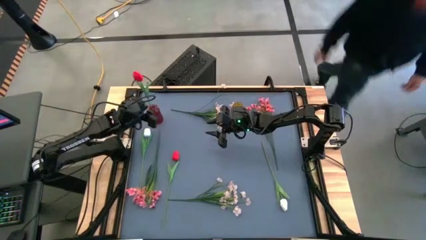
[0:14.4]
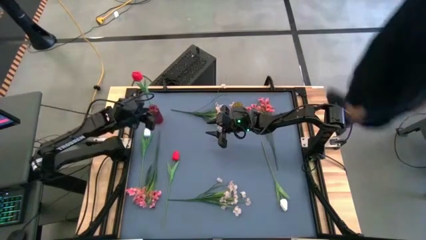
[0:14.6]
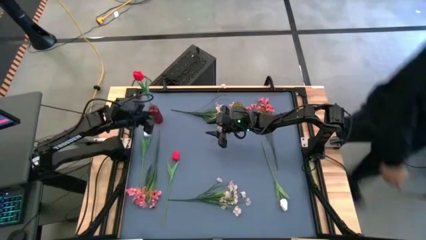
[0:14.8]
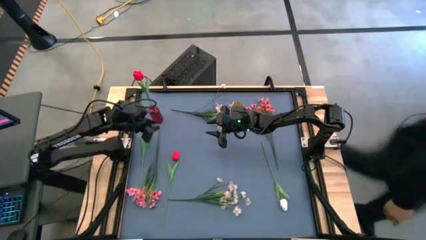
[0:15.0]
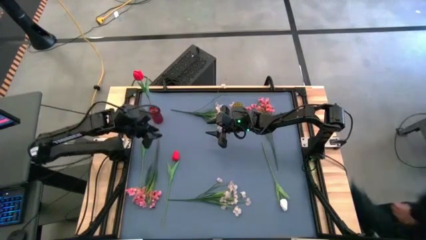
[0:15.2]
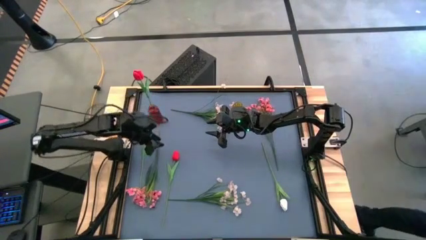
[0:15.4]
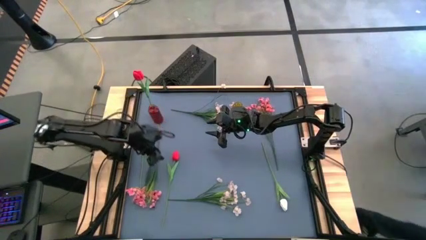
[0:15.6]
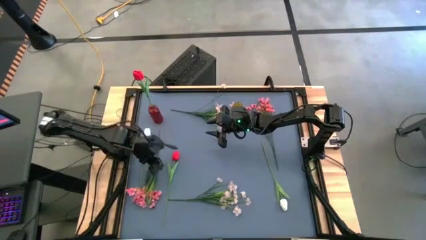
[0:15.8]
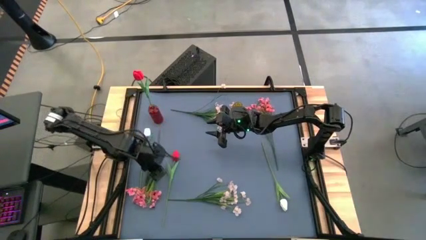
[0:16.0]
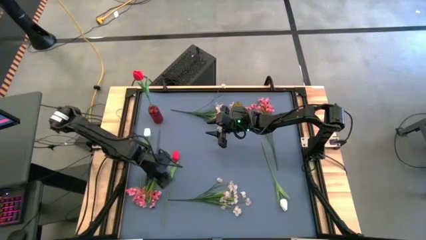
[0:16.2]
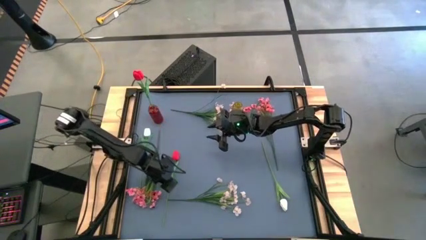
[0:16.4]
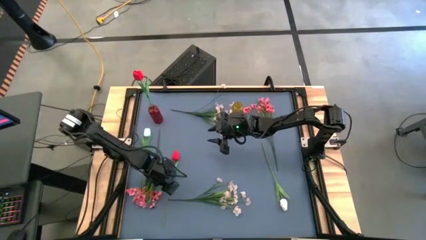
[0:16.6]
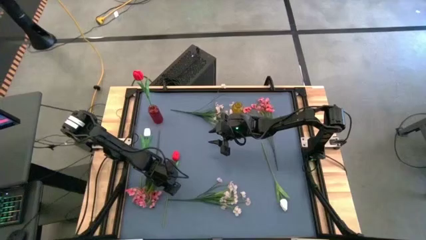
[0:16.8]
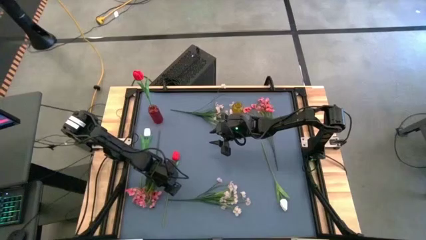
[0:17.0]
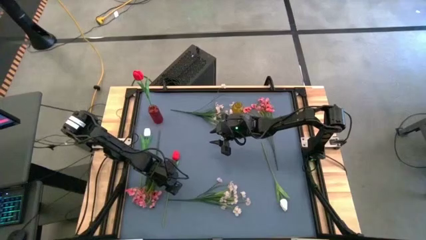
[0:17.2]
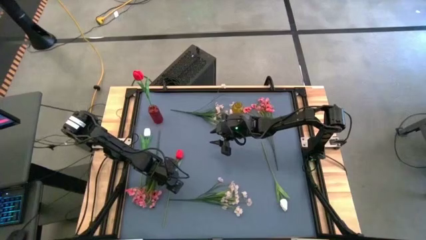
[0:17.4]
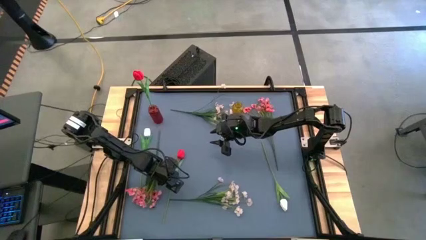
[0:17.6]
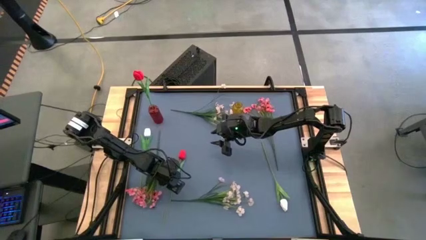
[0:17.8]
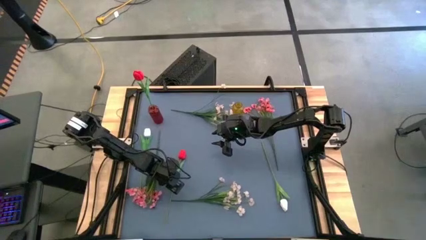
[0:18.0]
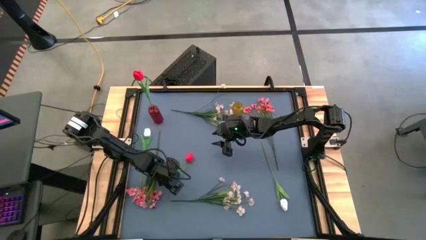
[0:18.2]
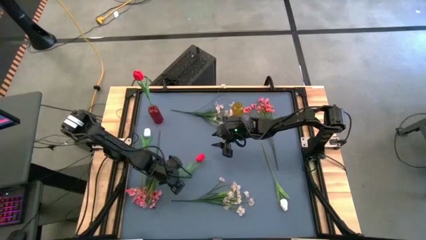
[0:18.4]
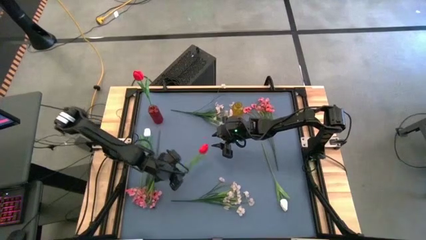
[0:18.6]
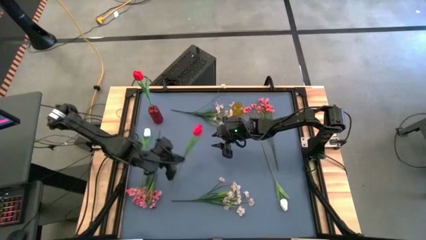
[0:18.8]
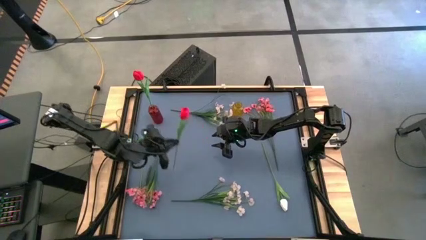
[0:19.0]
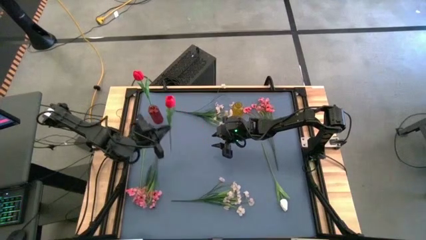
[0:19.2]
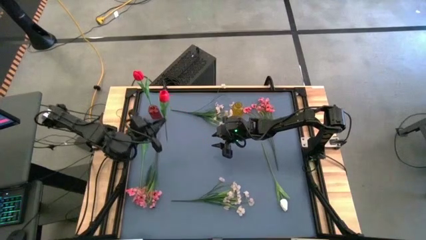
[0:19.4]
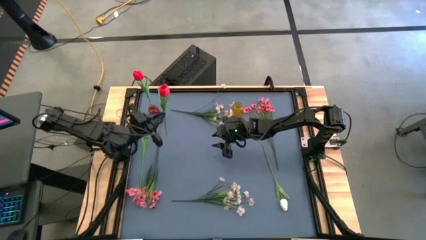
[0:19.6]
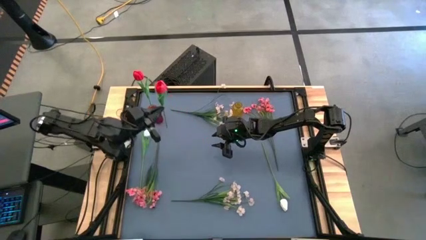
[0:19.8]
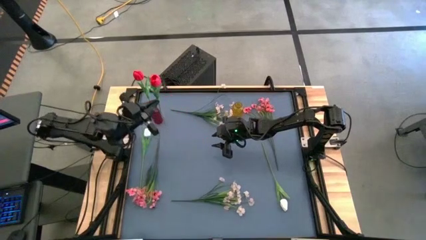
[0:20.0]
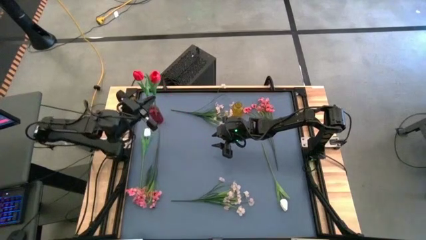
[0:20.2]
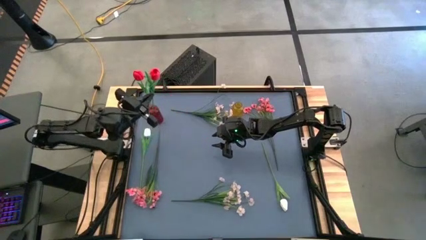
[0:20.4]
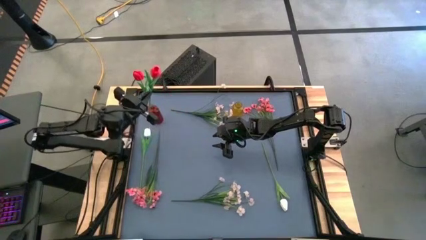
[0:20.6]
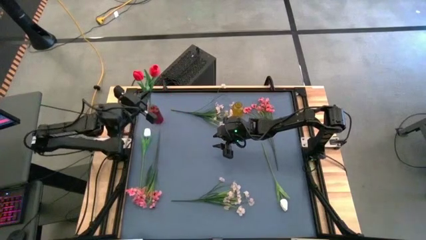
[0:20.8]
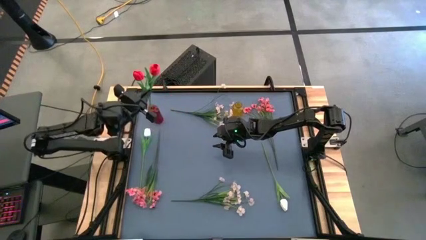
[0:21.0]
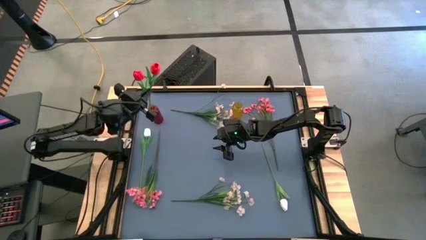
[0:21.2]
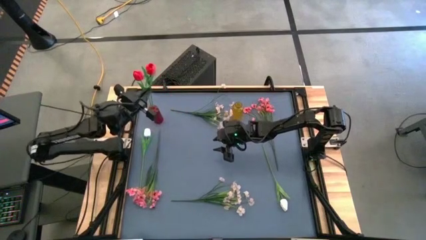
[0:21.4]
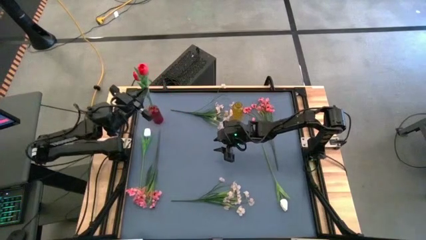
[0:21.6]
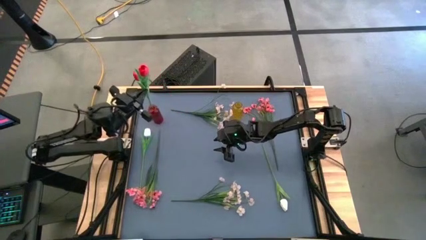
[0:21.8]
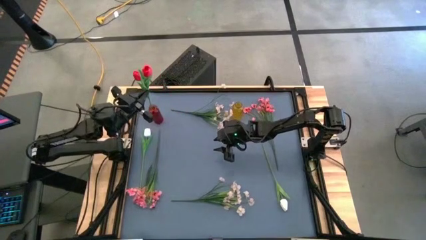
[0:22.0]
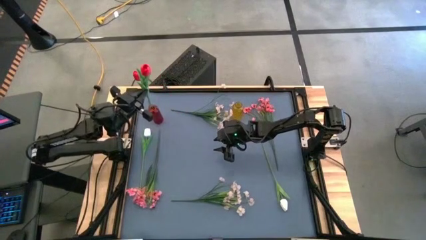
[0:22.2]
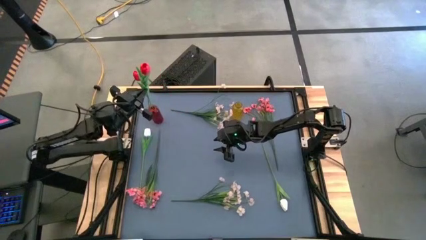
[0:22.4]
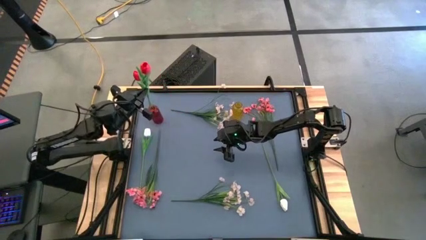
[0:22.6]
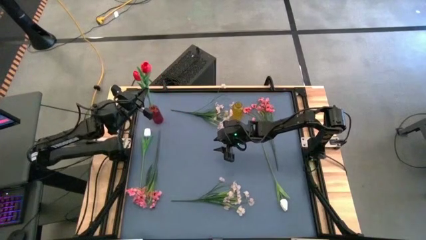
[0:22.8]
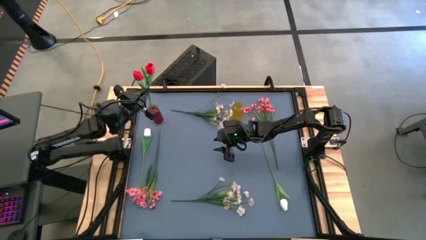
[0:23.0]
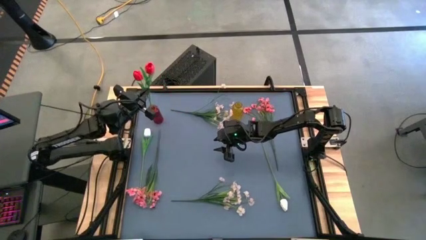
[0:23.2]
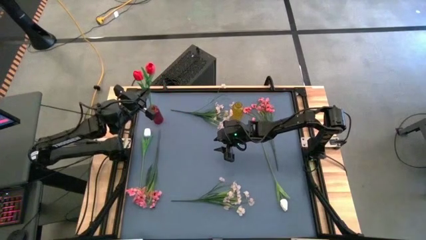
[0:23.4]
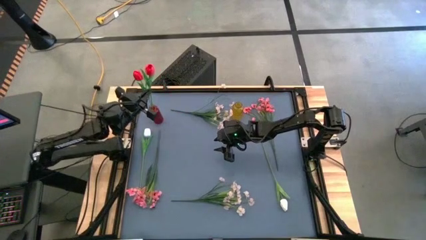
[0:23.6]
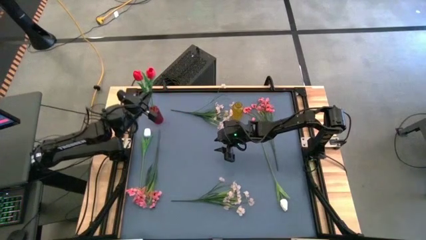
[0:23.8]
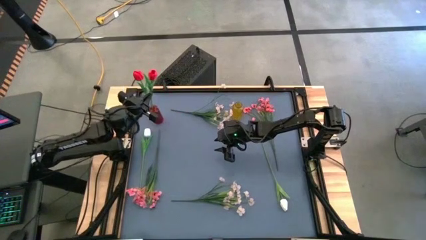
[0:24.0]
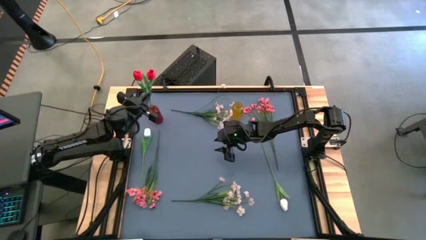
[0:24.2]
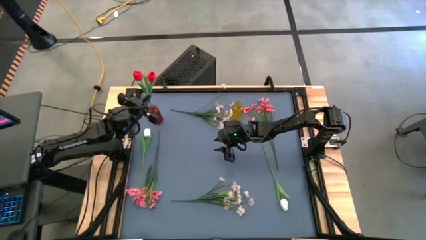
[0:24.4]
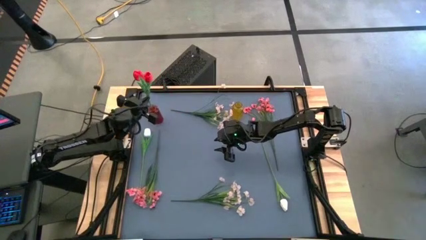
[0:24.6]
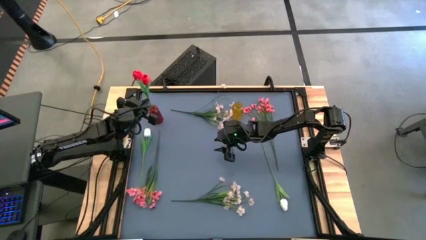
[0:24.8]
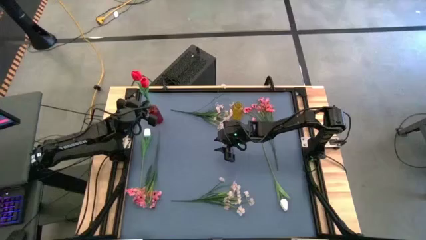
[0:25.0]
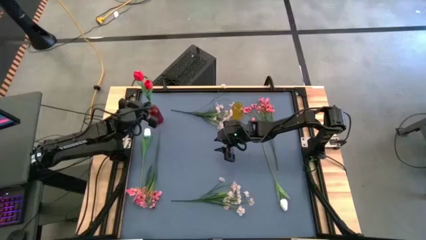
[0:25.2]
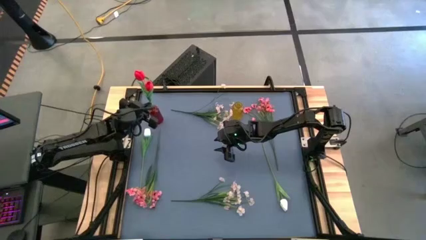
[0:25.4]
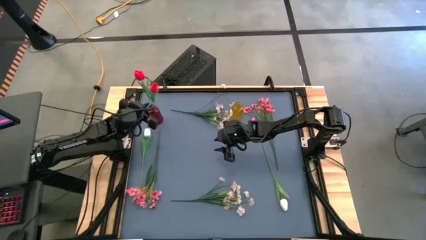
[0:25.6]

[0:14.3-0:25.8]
Task: Sort flowers into vase by color
Put the red flower into the red vase

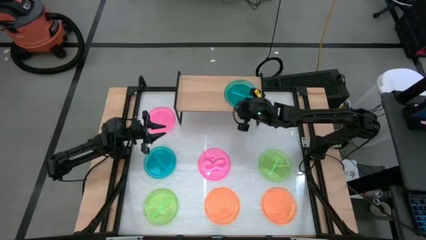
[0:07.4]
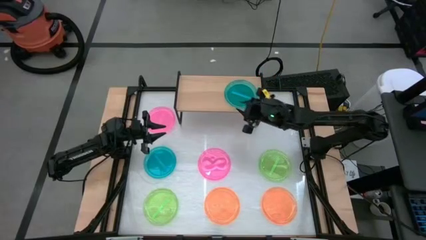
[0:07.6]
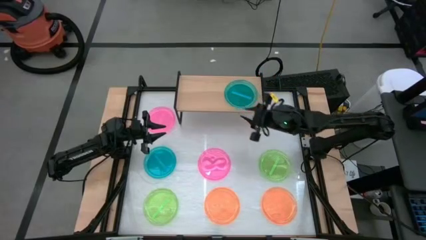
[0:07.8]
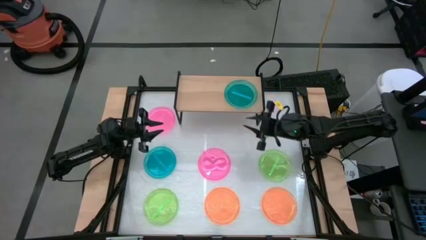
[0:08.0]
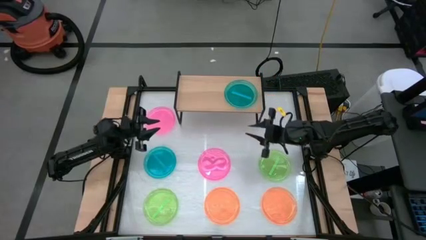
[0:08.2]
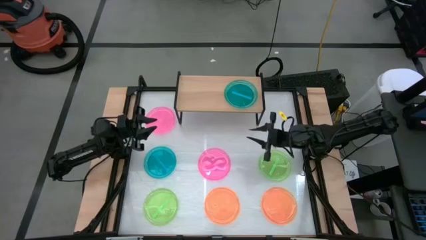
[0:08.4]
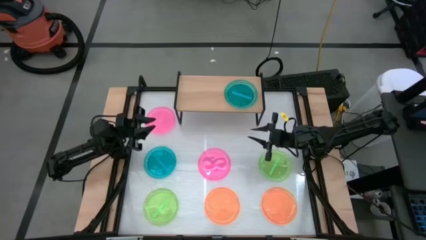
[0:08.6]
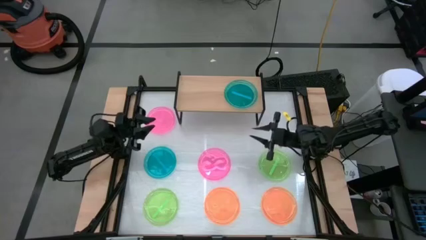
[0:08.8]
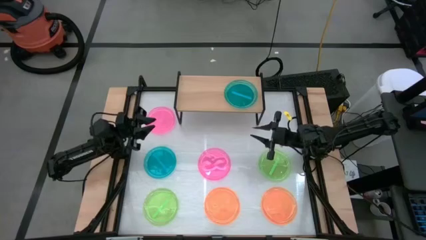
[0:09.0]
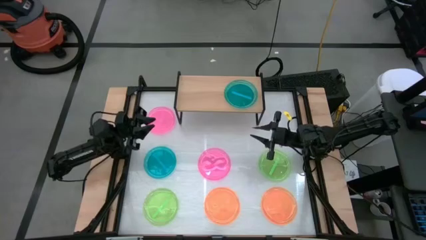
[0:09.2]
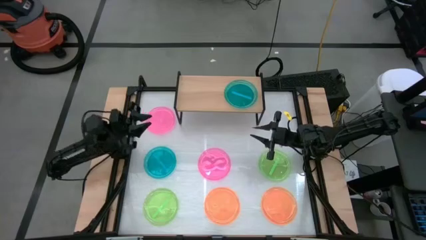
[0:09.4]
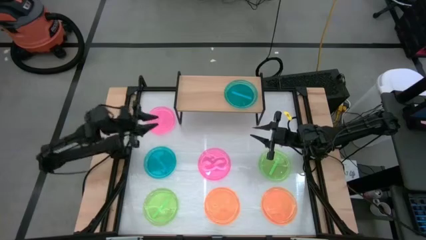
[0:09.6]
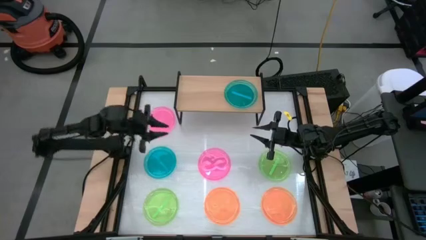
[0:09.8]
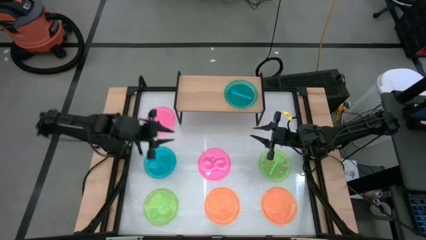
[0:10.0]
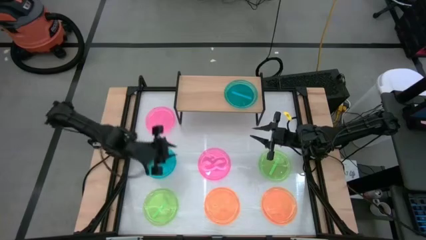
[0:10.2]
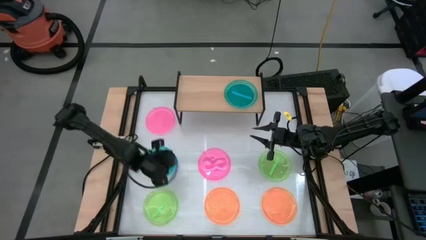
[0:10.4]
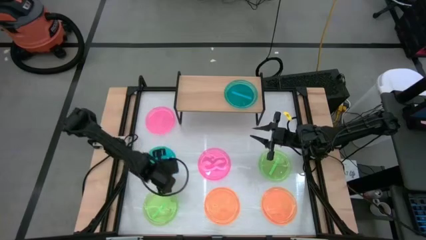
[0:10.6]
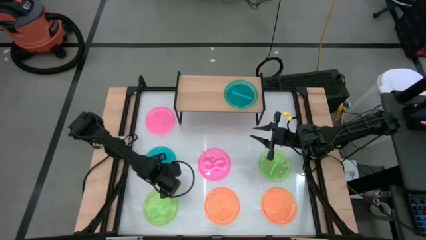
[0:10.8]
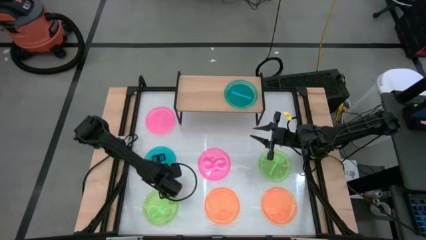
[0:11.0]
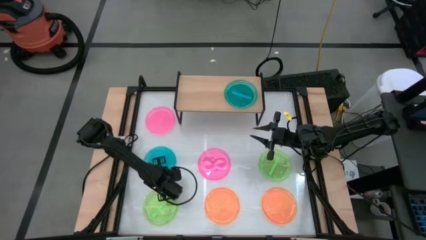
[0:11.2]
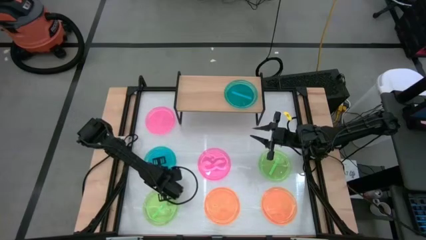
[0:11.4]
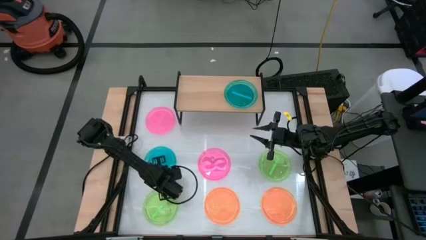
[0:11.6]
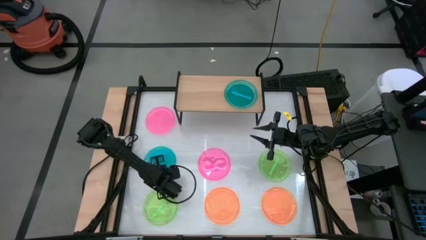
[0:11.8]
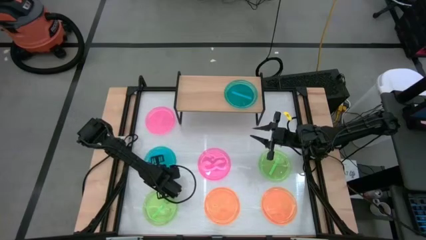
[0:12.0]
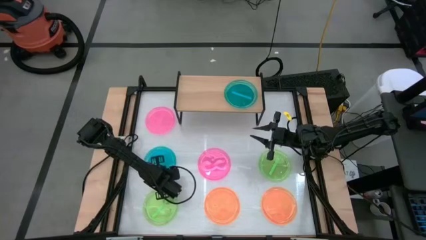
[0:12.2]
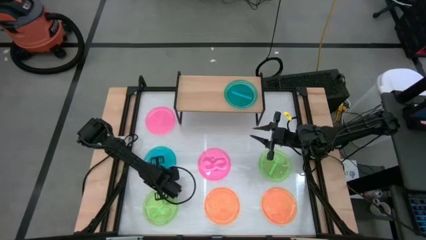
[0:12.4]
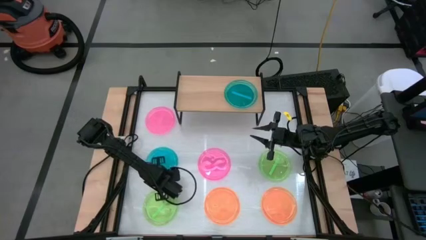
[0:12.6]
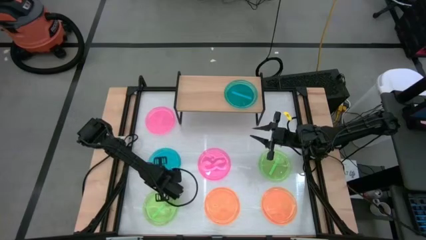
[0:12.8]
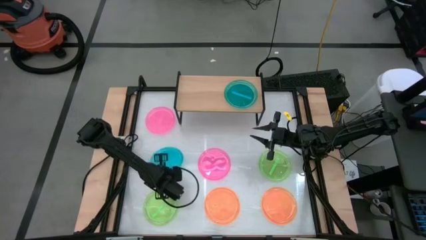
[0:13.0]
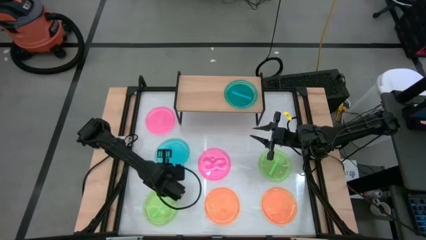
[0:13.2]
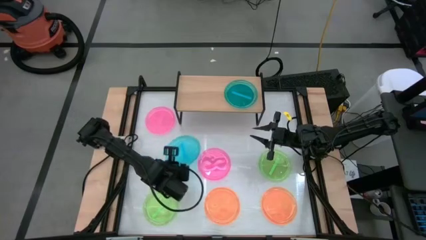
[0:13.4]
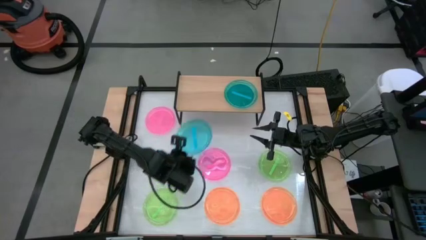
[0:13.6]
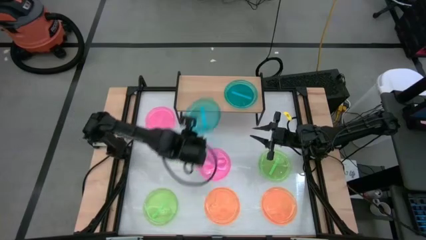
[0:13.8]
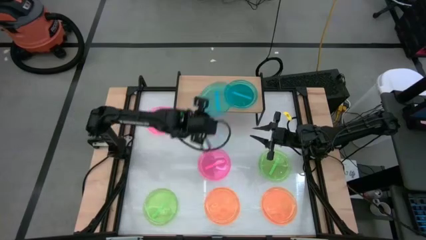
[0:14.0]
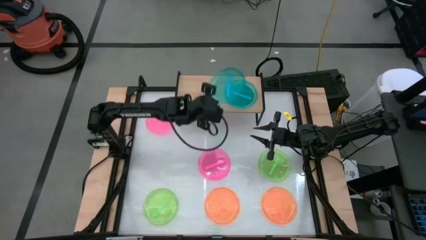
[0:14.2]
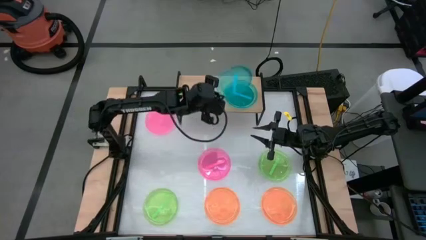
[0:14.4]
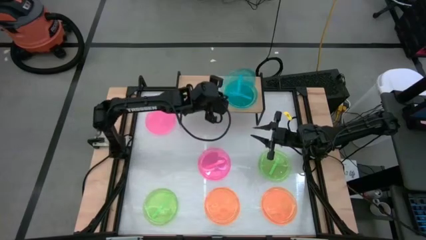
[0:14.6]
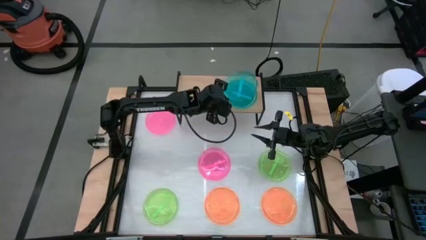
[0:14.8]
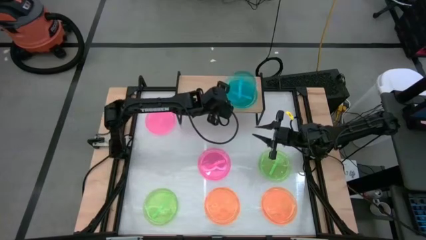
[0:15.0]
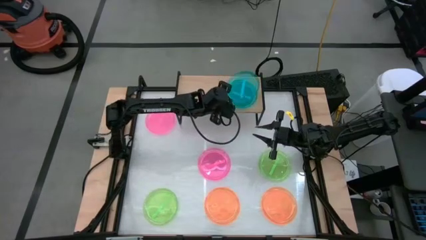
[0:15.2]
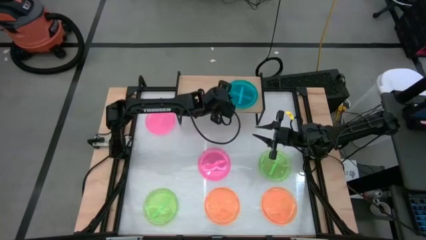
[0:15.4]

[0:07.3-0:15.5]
Task: Place and stack plates onto a shelf
Stack the left blue plate on the blue plate on the shelf
